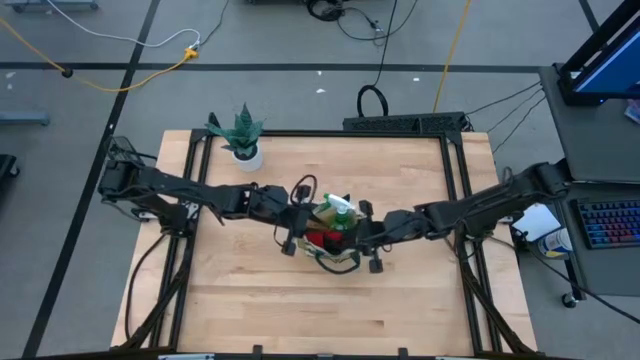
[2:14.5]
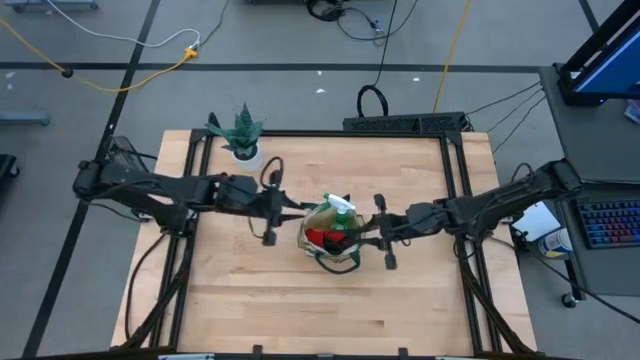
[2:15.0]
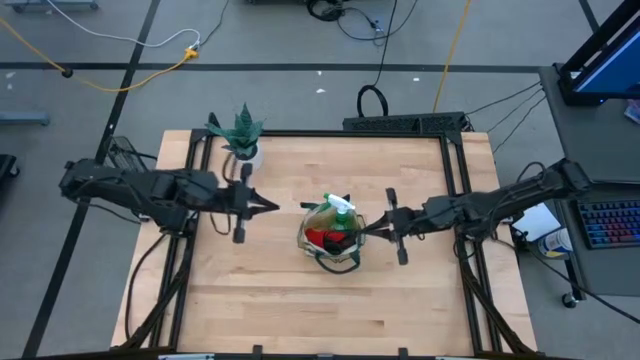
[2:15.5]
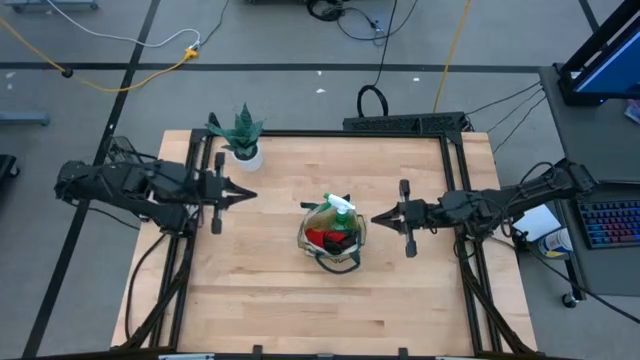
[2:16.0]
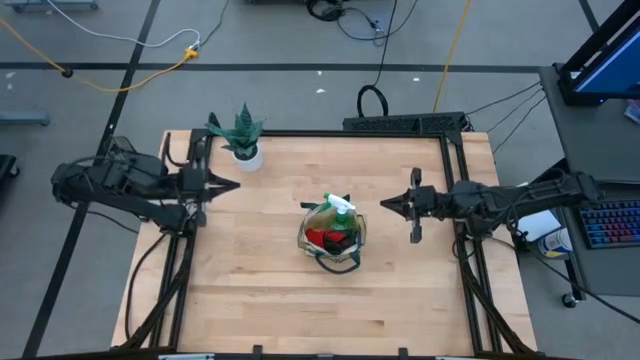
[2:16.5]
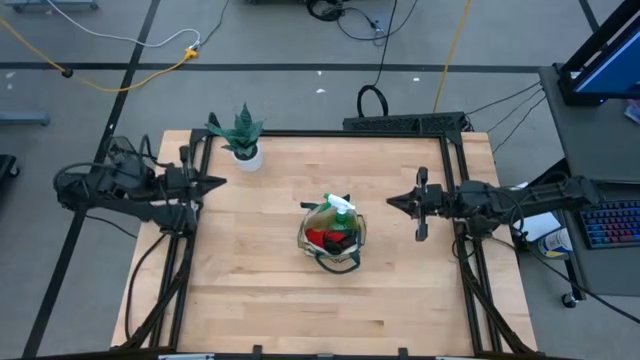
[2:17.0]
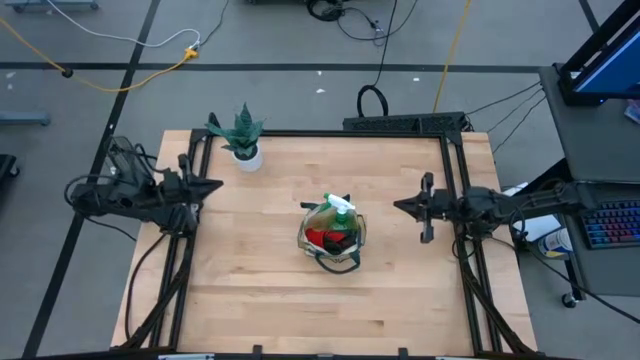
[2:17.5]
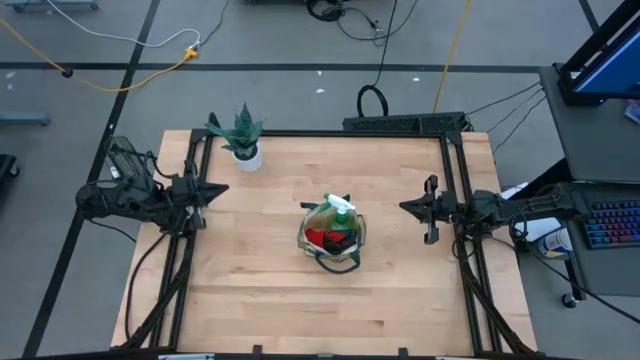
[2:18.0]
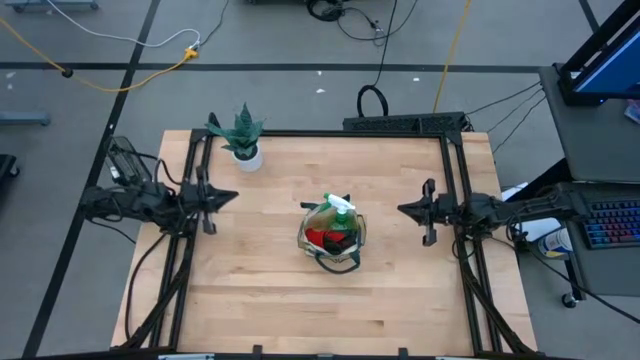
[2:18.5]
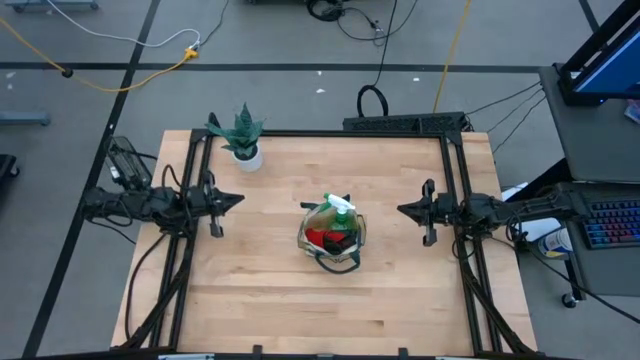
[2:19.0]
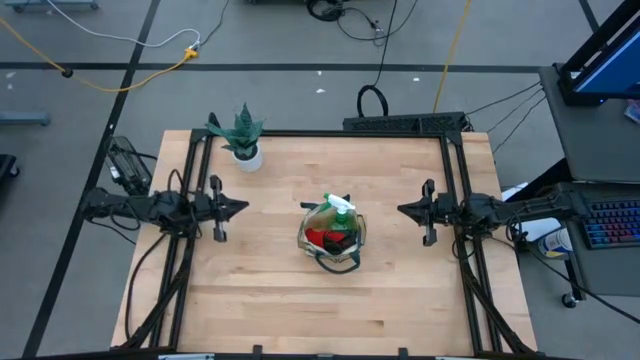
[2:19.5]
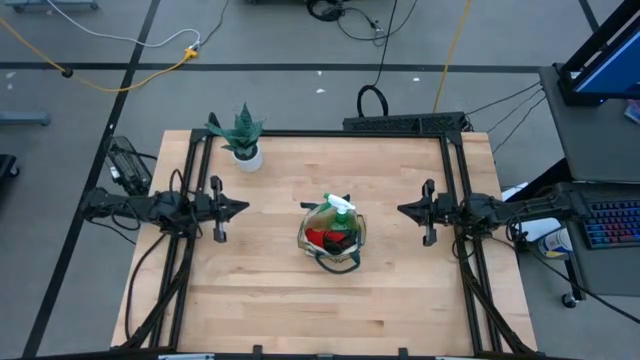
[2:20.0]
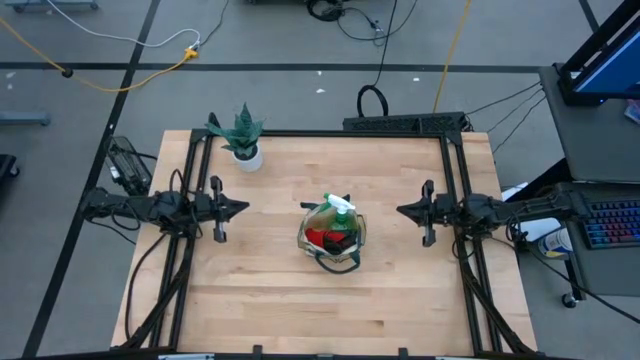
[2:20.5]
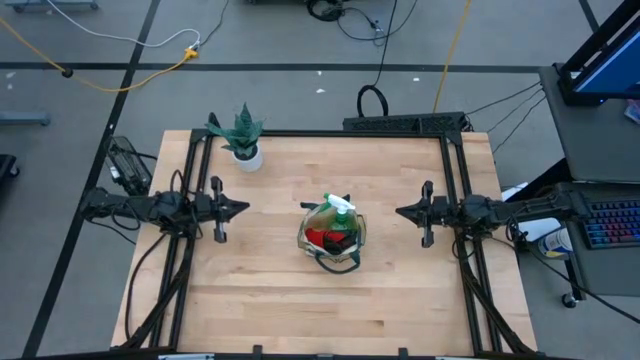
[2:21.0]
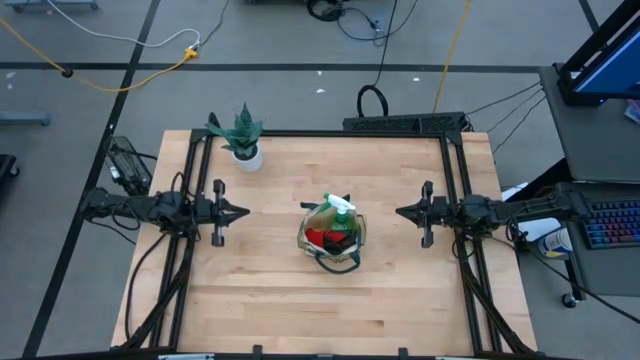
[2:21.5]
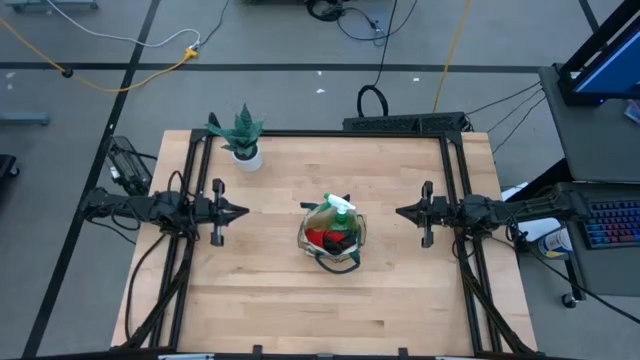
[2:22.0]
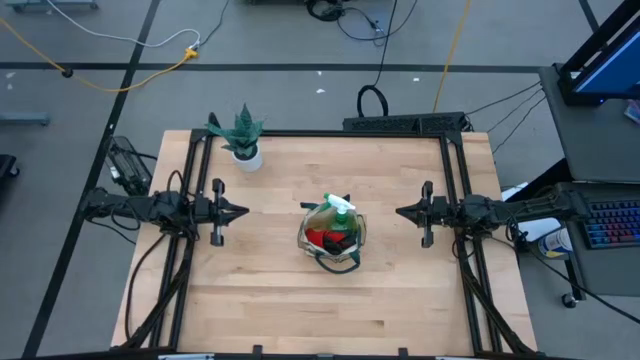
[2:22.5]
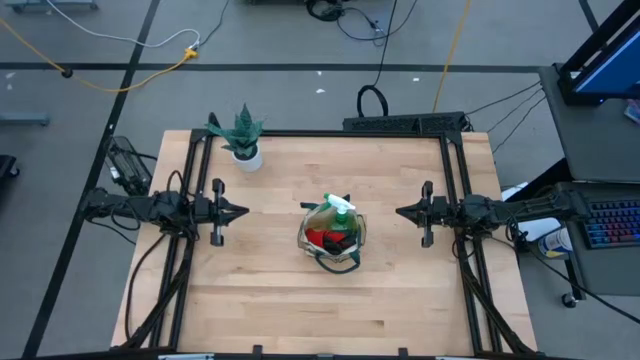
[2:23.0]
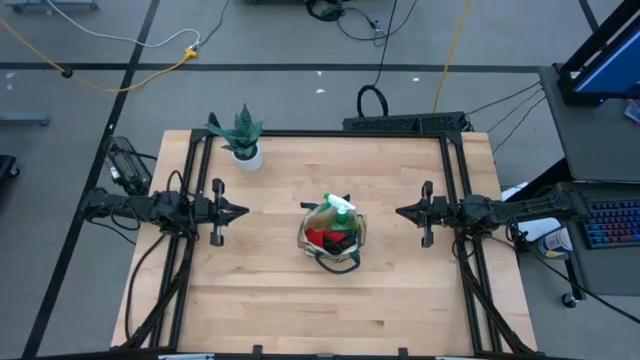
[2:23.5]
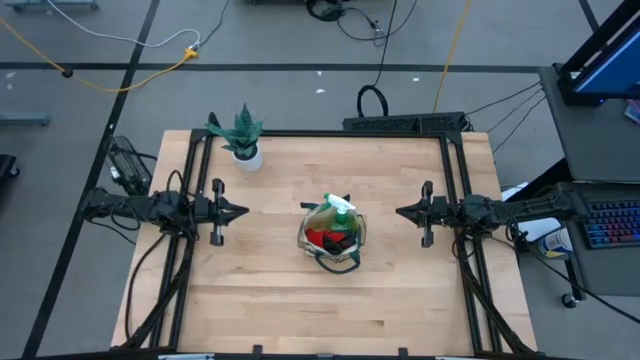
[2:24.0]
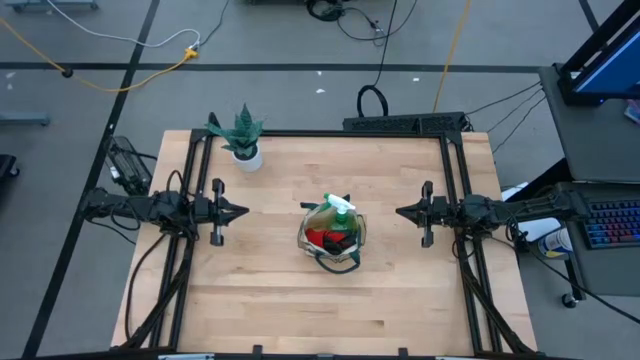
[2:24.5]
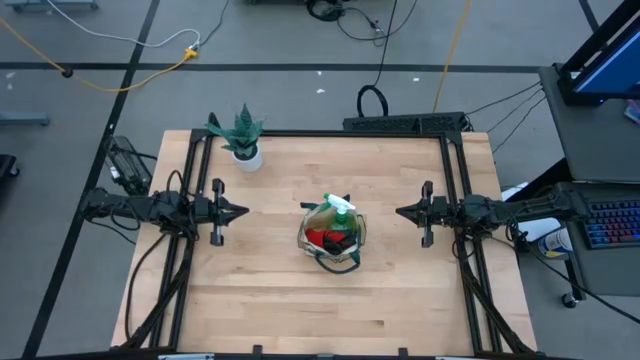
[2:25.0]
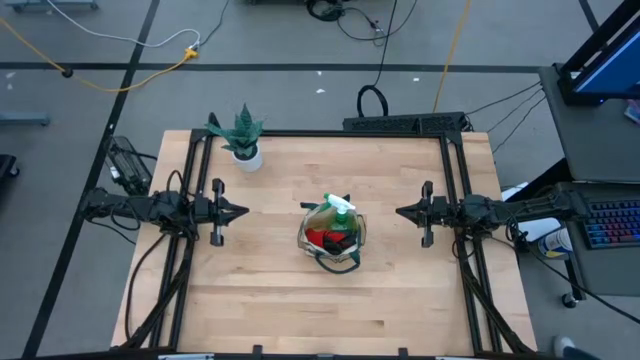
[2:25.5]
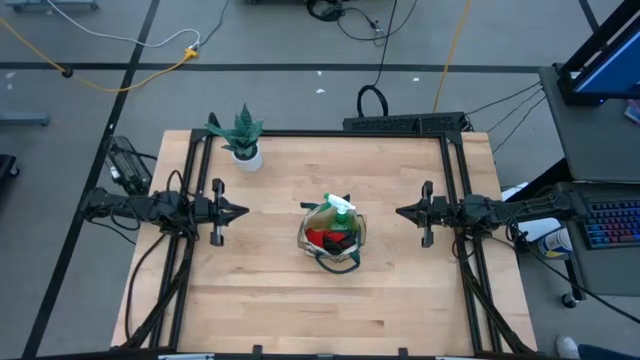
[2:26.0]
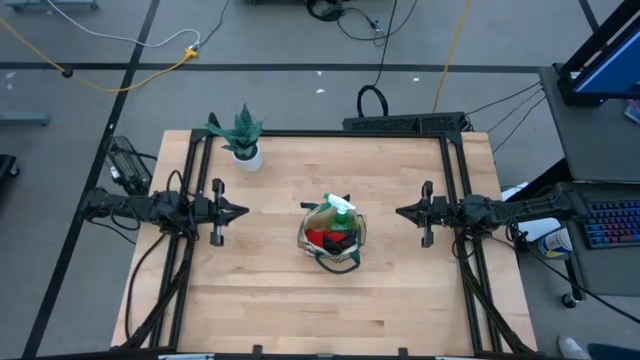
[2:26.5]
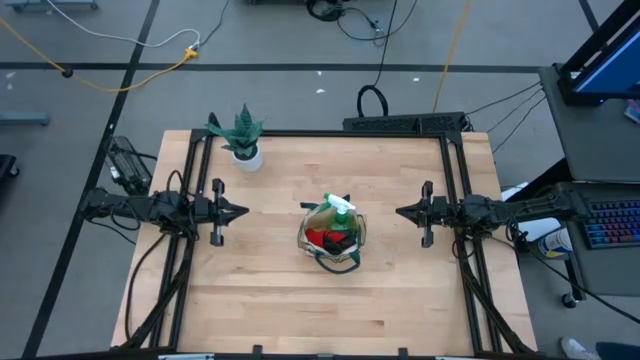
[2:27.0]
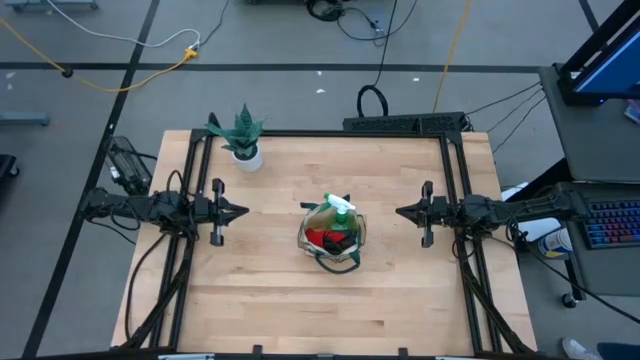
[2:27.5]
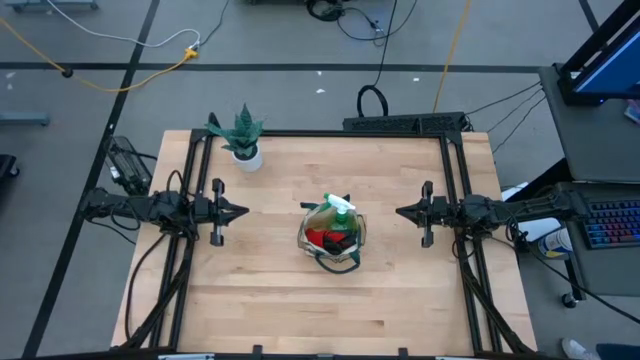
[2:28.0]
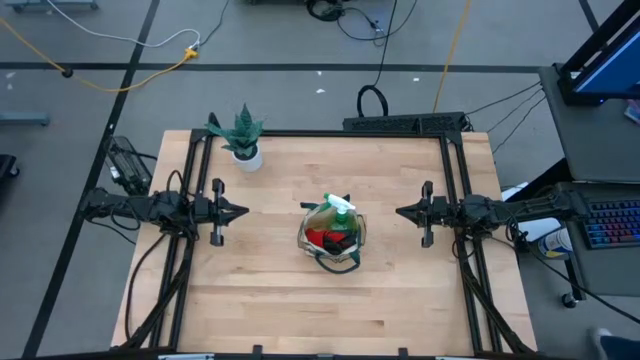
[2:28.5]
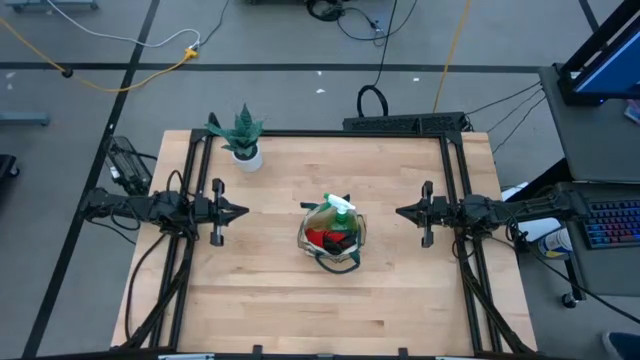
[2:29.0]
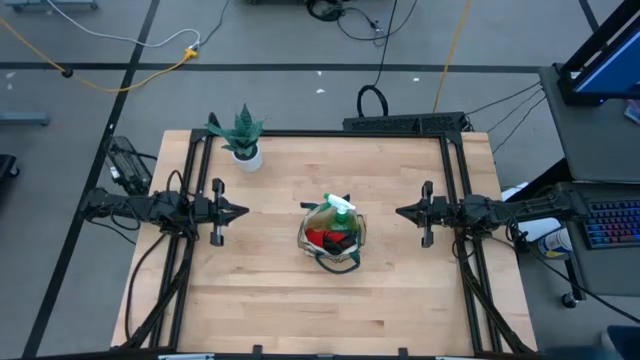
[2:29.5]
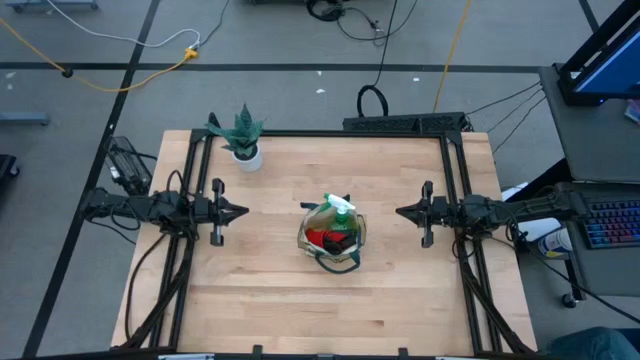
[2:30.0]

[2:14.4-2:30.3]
Task: Pick & Place Garden tools in Gardening bag
Return to Home Position

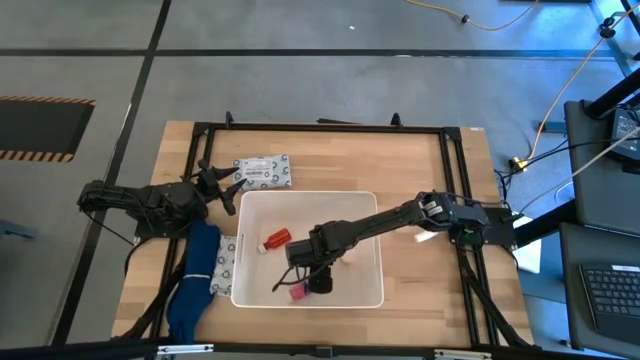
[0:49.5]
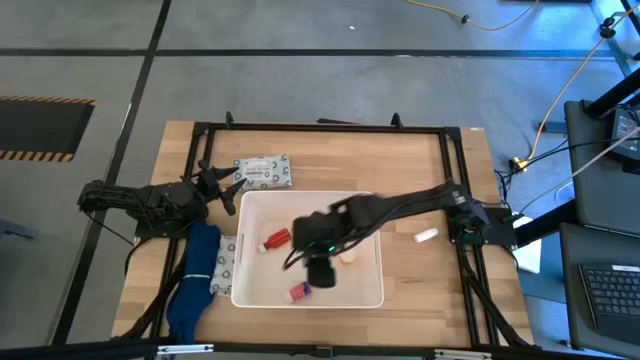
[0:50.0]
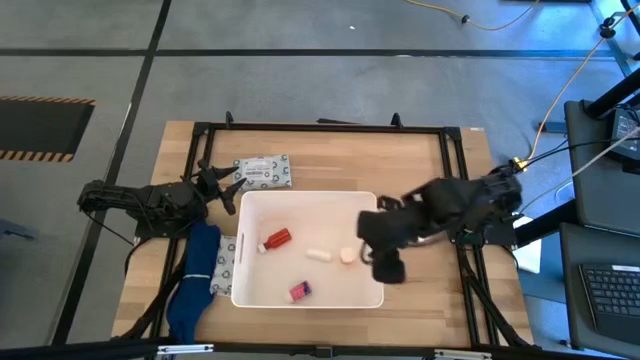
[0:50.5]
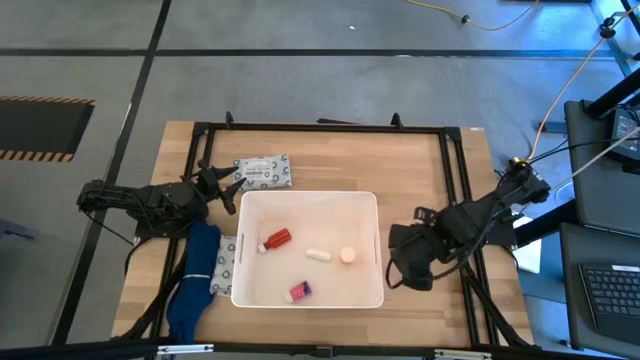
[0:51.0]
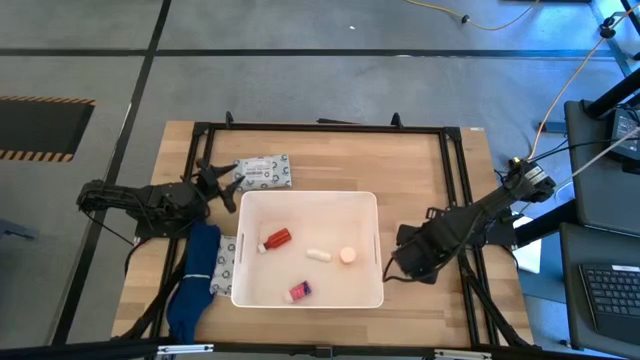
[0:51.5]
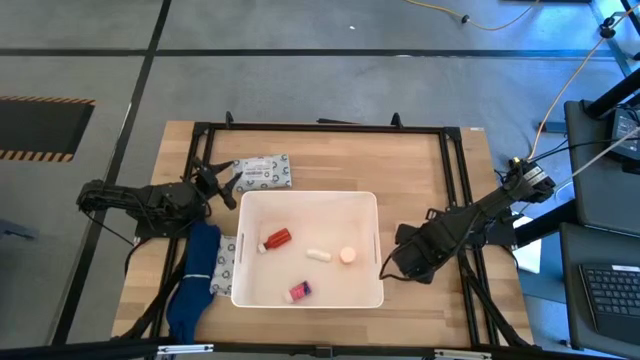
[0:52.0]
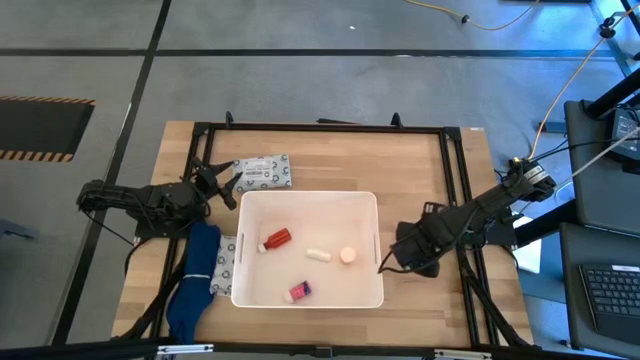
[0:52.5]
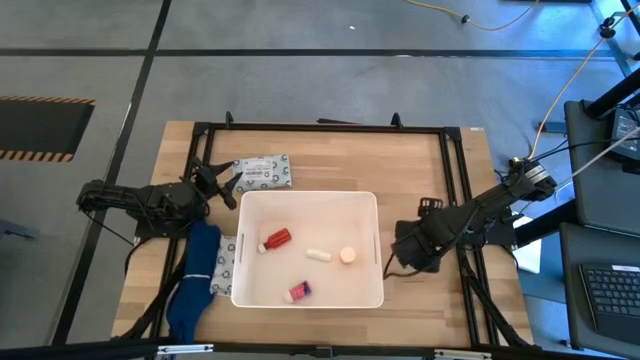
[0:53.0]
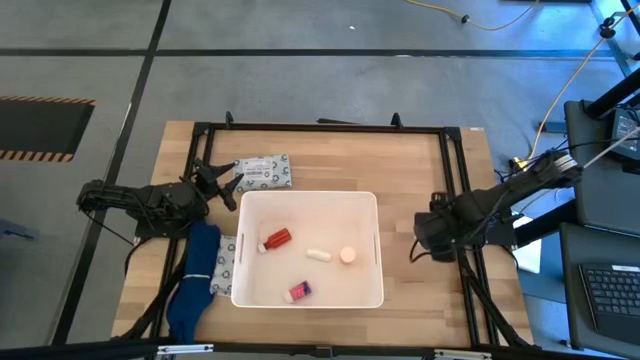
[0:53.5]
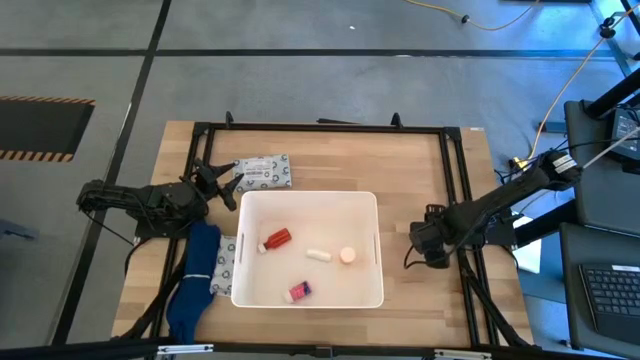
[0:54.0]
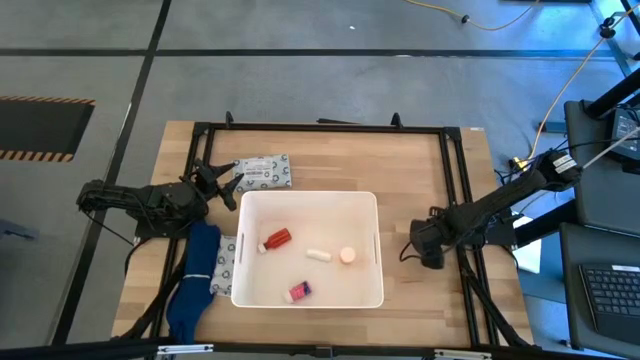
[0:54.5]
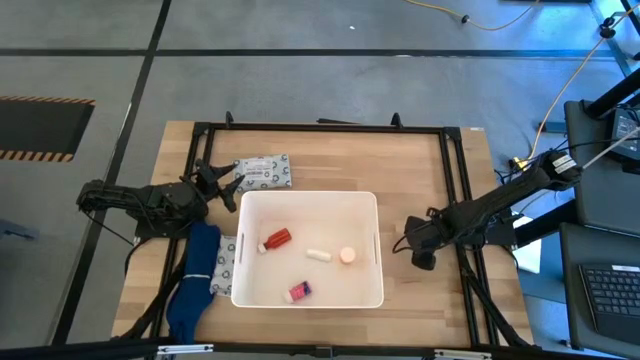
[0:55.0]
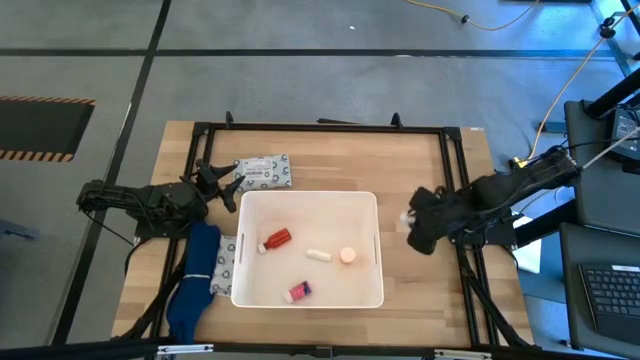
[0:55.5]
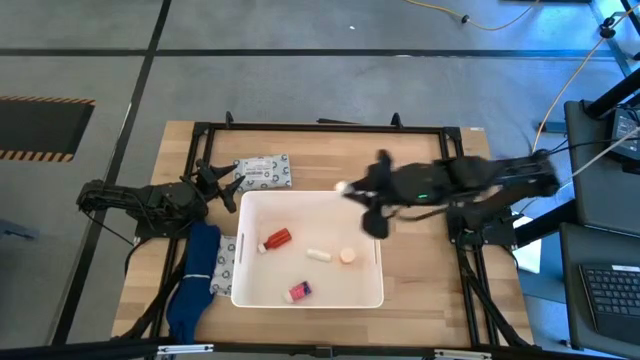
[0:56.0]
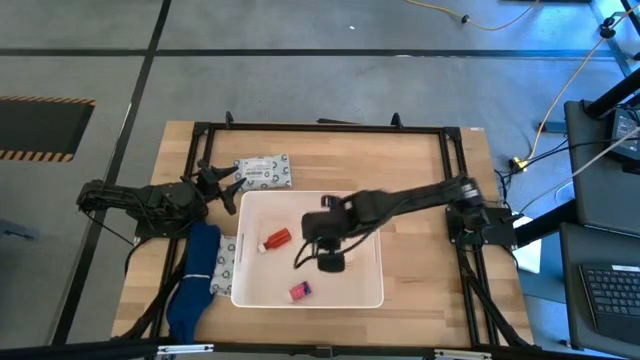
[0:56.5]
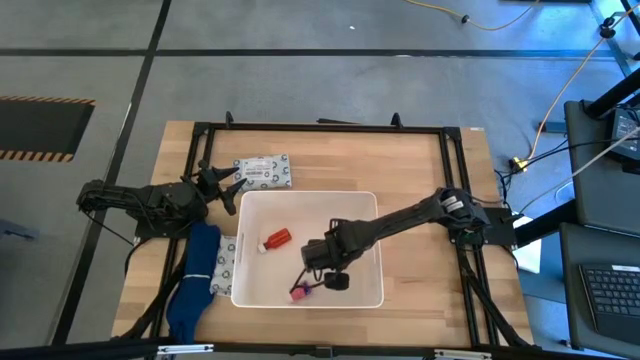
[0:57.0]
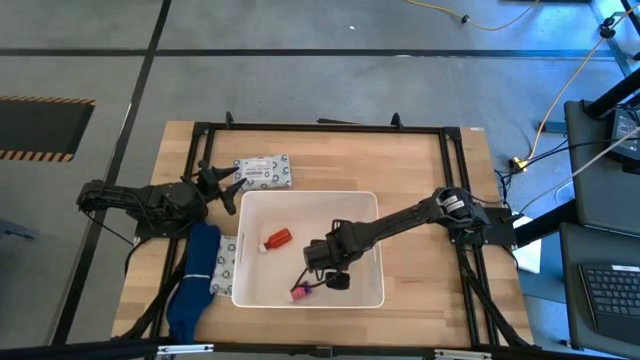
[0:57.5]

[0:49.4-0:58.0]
Task: Pick & place medical supplies in basket/bin
Put the bottom white rolled gauze into the white bin
